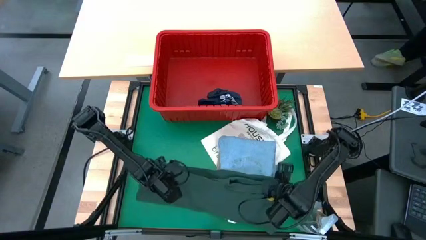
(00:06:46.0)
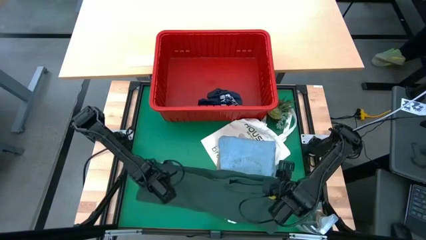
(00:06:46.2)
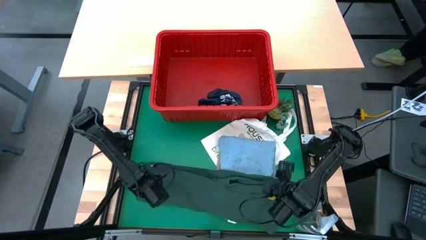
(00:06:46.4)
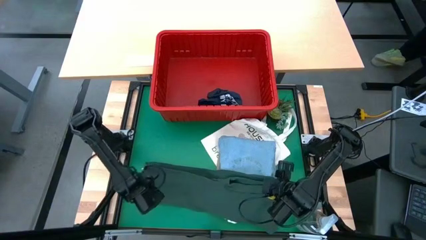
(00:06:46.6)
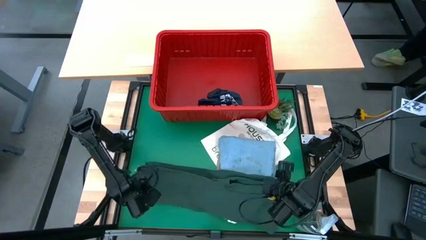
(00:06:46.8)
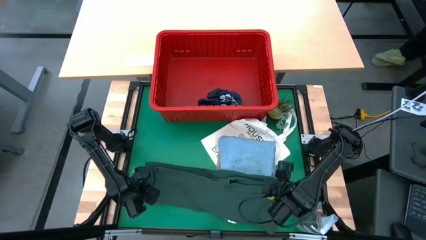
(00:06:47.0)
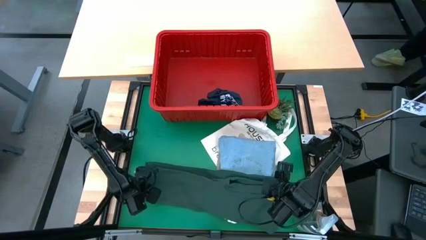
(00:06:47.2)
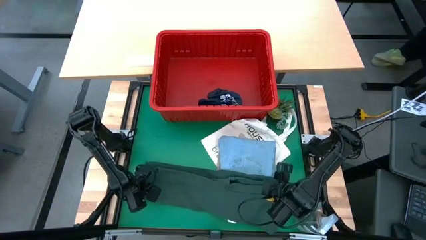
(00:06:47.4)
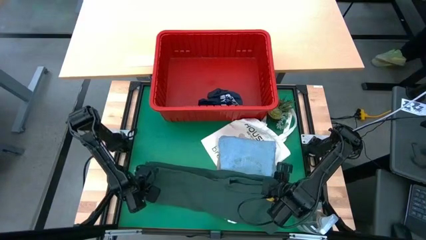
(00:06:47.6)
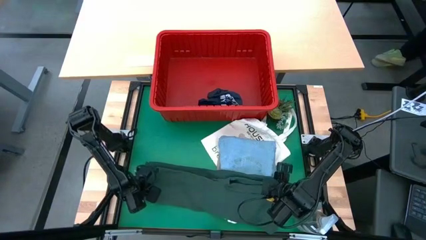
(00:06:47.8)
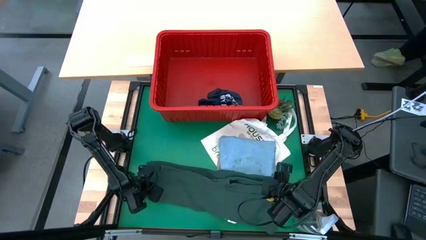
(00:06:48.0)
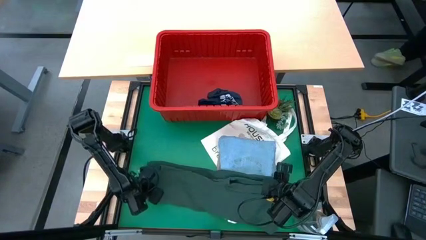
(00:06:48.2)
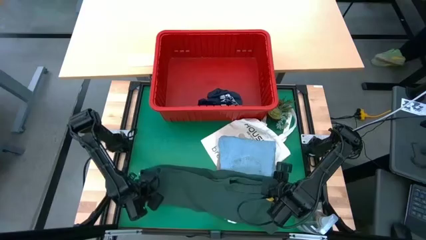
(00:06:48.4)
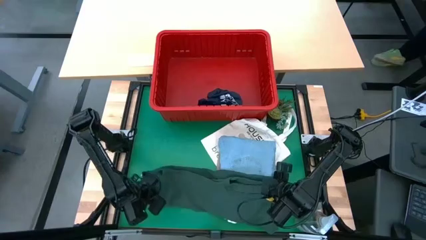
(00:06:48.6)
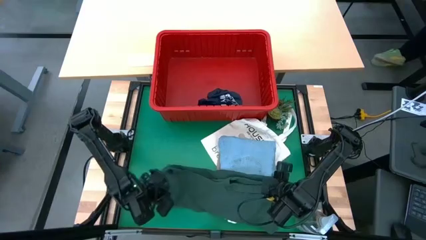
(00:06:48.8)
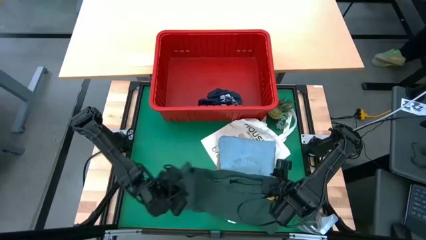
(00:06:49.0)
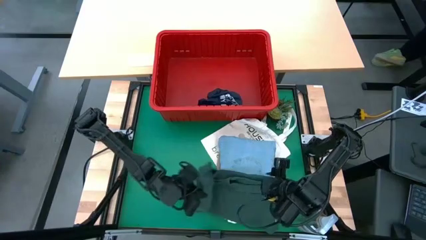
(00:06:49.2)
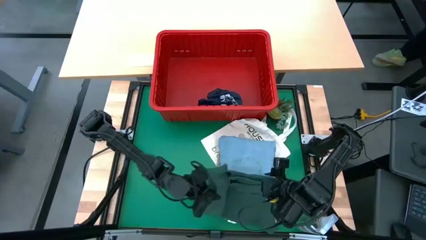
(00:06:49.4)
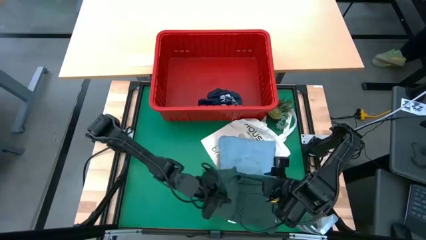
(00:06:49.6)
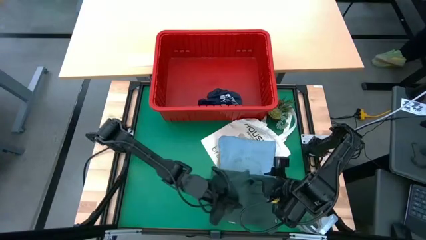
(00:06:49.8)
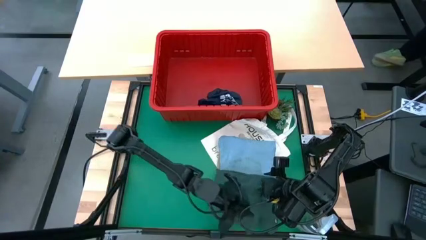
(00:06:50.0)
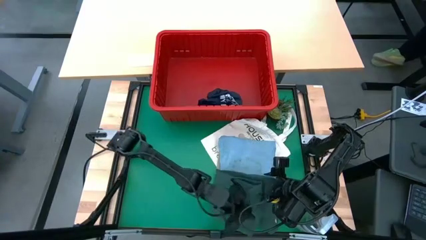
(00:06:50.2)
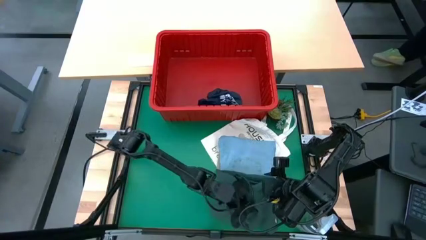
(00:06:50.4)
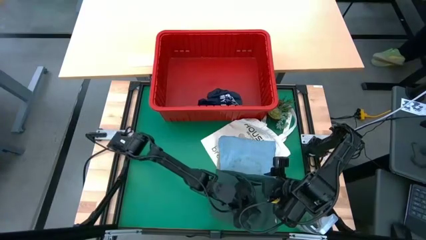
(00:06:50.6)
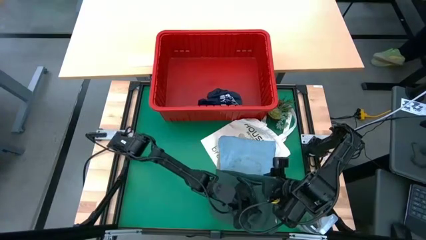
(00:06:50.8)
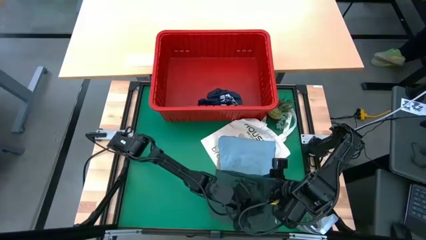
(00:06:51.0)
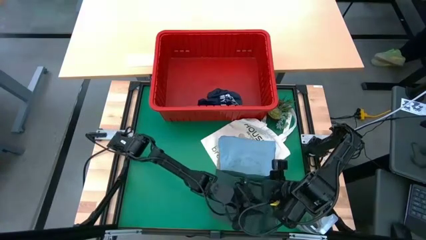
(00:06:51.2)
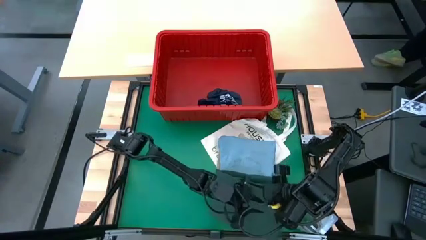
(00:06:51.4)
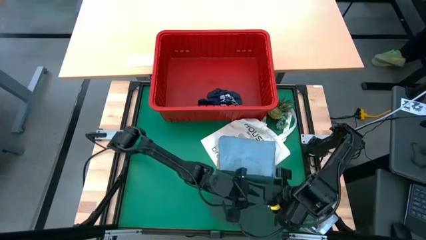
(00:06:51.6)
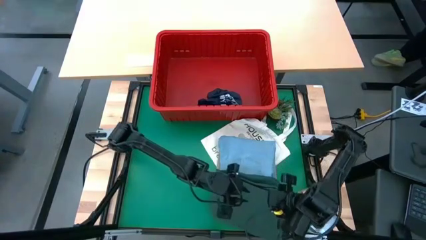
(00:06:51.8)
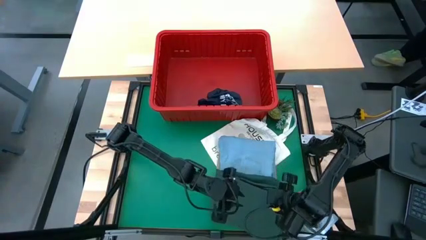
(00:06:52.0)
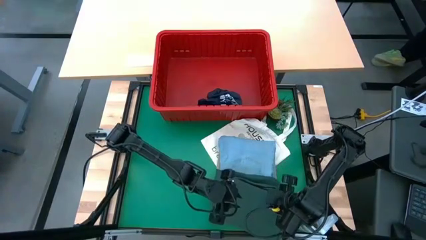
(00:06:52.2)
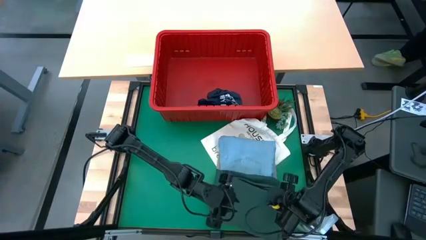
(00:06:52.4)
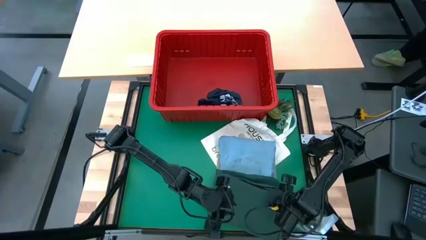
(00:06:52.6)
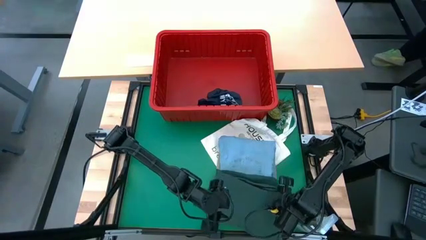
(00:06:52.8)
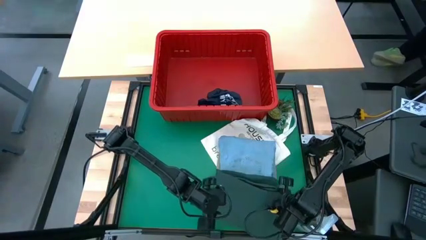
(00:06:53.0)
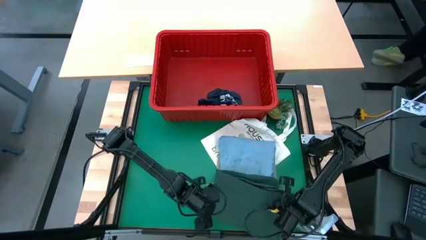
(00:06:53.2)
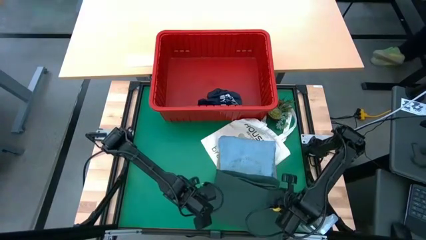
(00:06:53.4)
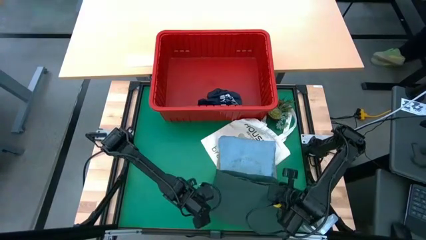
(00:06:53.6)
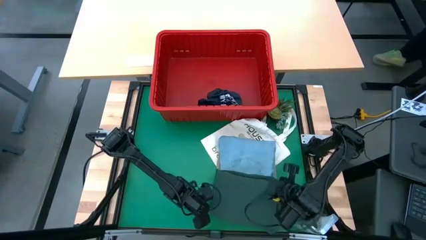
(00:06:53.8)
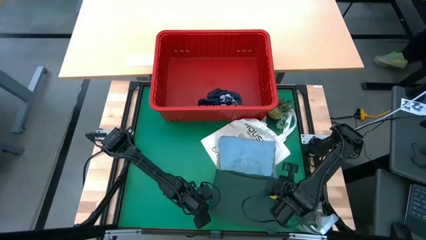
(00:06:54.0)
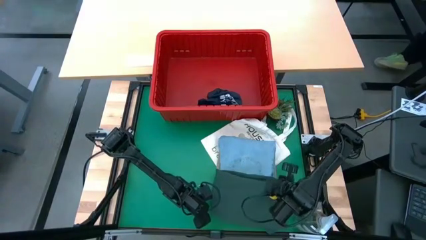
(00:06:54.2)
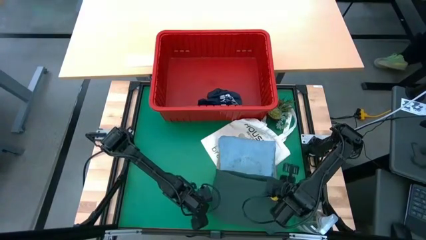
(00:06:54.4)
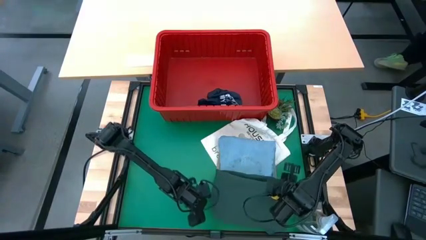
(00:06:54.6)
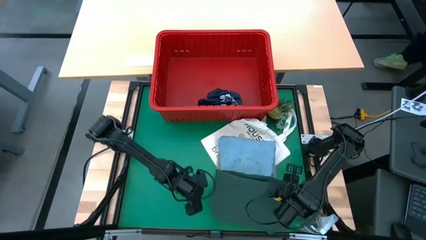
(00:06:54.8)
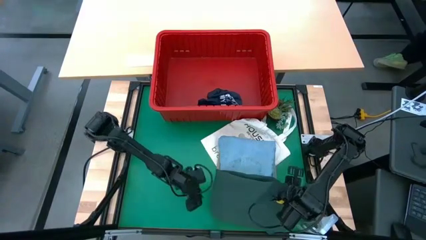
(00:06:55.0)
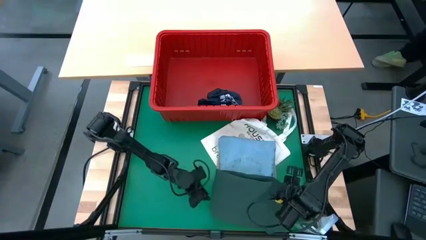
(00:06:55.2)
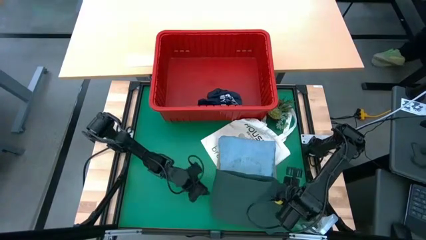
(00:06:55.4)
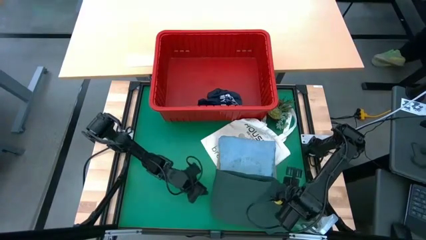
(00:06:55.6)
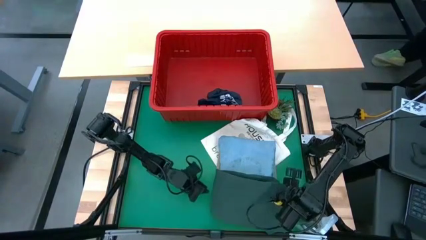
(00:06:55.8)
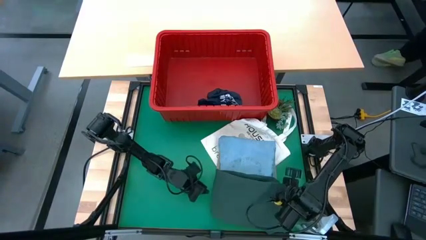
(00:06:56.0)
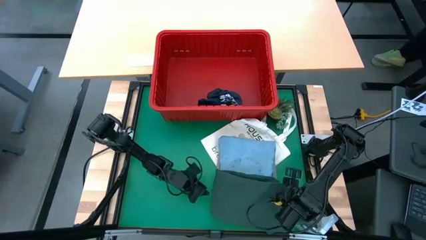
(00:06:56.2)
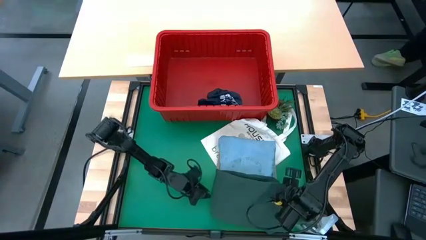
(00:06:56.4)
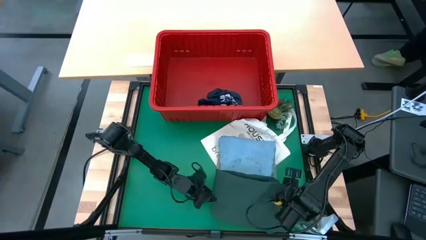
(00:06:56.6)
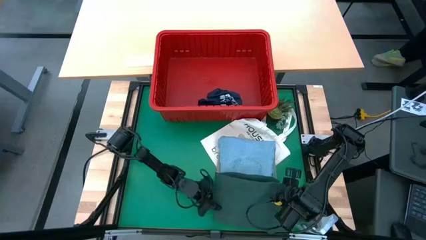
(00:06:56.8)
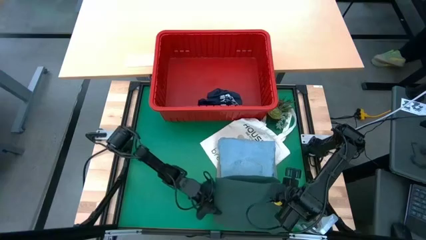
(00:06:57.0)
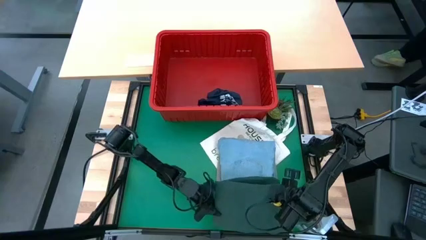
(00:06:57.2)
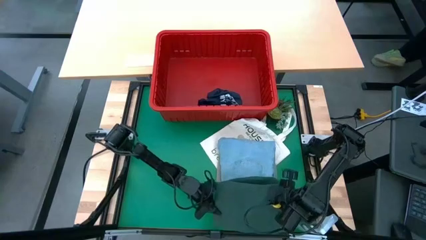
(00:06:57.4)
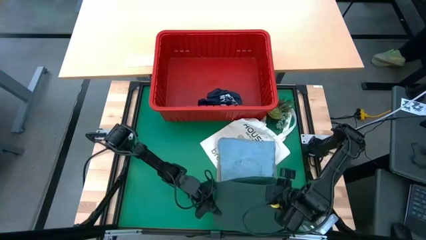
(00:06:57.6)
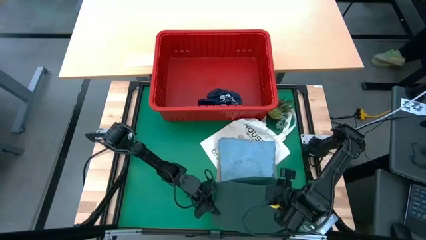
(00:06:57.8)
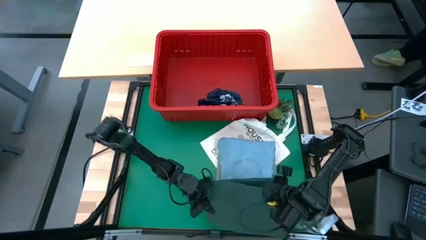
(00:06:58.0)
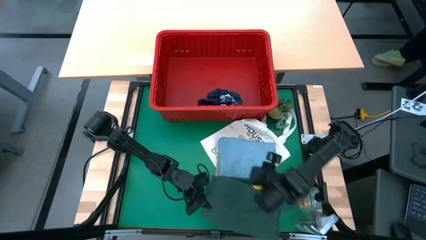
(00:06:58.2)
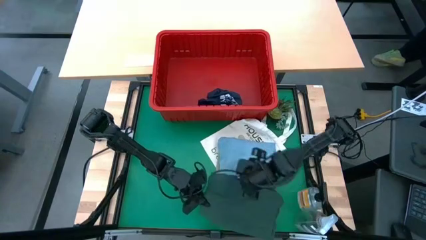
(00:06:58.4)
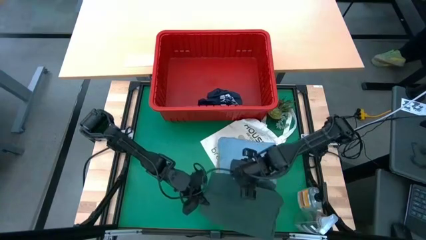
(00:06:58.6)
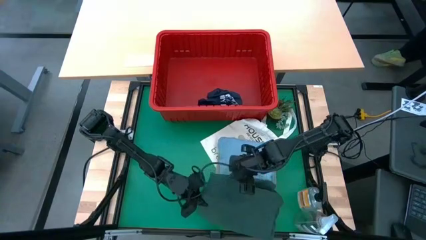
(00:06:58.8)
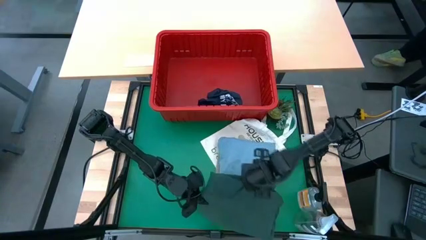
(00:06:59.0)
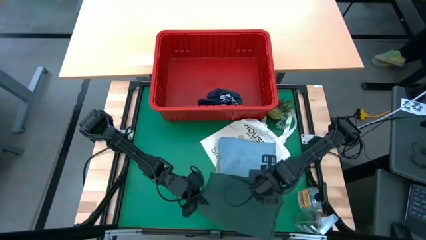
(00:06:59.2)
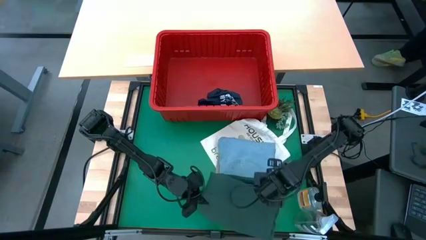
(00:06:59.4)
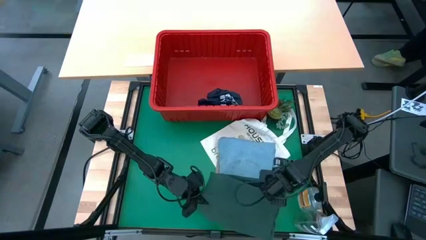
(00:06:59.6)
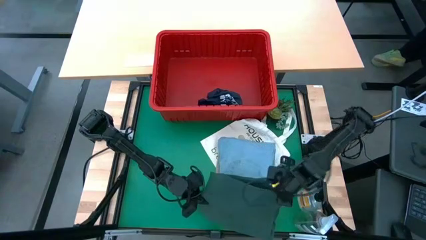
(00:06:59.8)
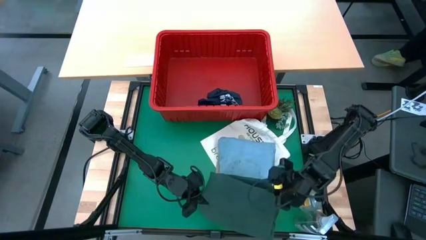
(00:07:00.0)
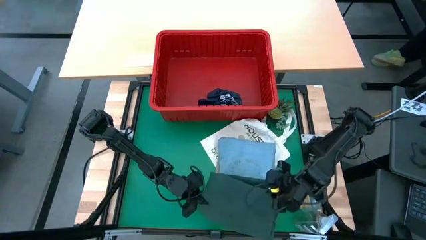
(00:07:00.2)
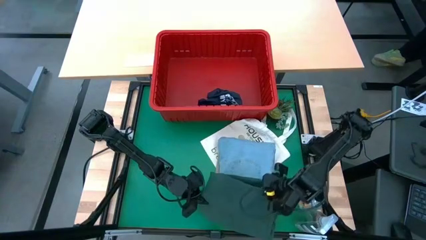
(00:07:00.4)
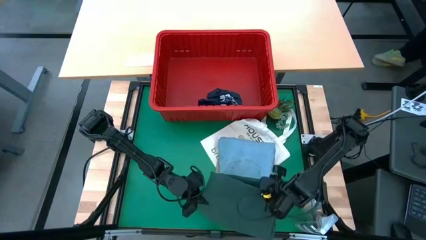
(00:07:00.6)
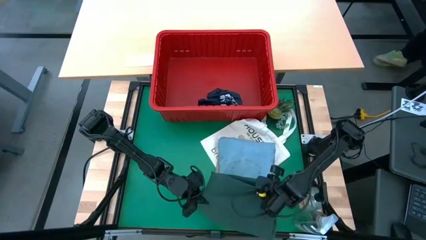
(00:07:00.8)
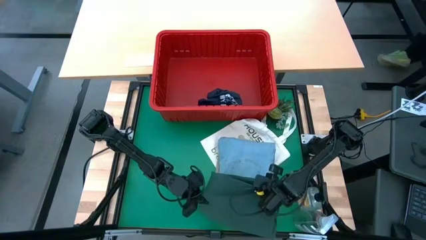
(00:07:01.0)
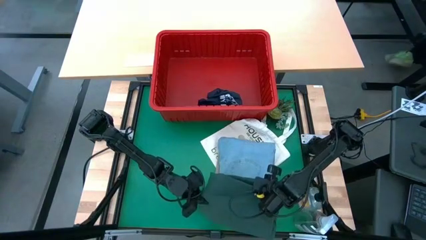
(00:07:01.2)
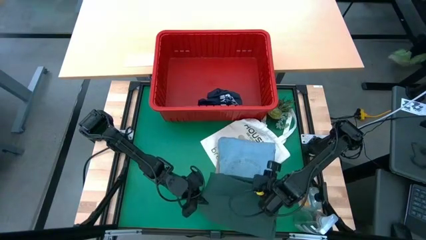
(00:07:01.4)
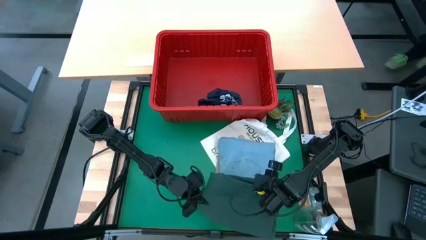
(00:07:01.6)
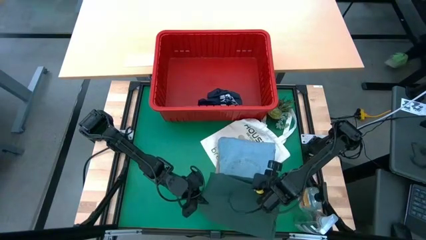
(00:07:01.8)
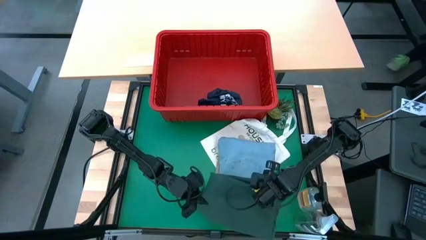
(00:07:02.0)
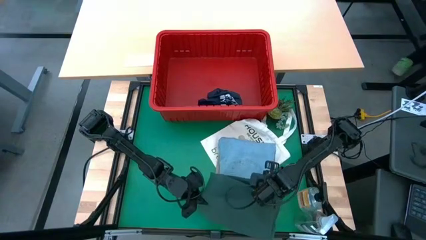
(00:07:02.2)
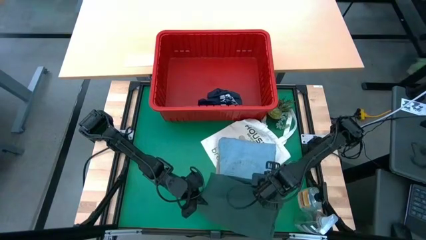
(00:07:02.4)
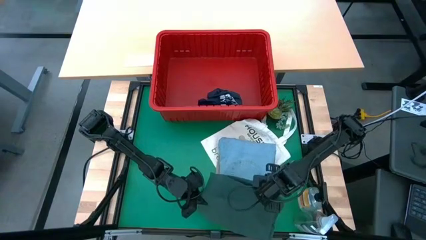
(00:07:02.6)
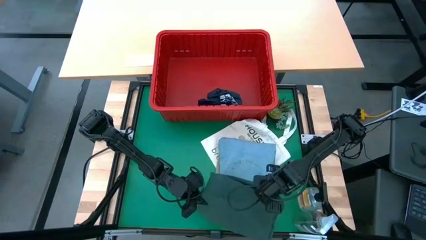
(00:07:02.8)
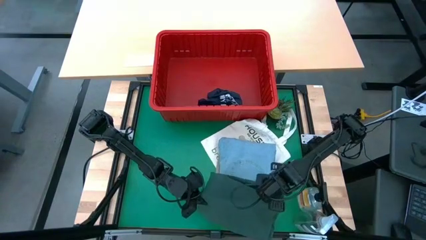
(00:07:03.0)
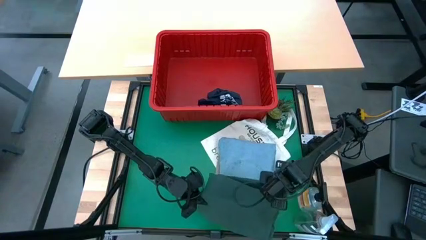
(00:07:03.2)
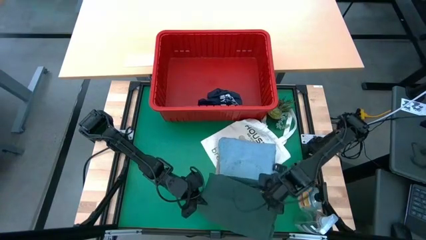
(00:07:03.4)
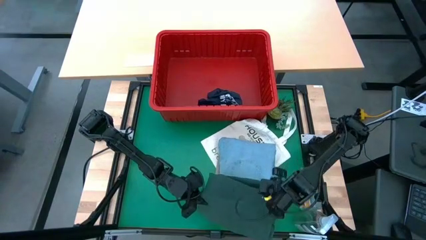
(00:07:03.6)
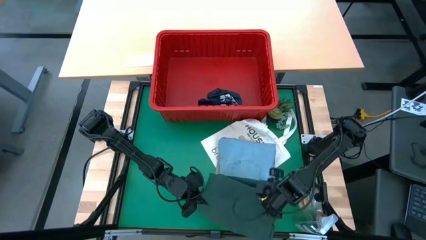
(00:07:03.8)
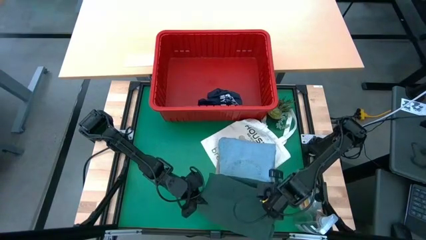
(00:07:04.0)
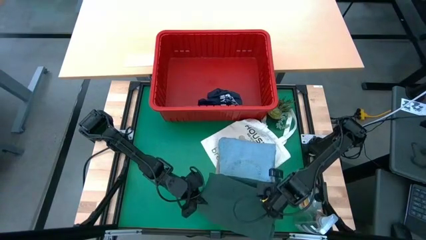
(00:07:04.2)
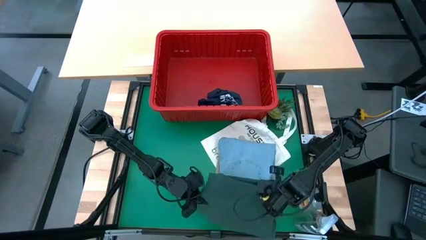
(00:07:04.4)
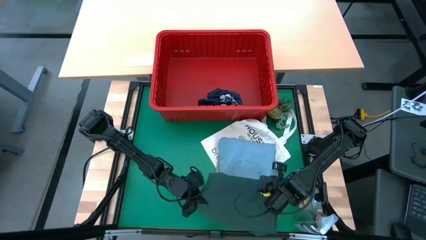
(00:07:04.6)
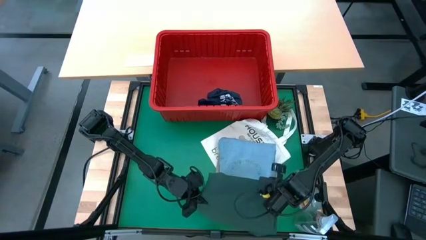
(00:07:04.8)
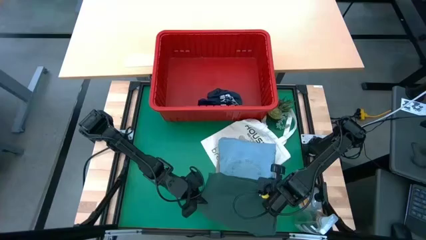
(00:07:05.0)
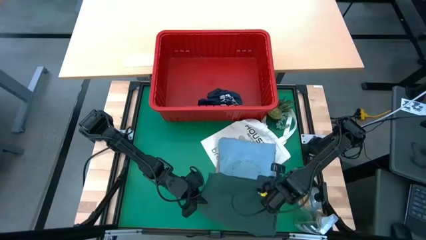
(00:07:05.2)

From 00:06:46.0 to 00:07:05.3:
Task: Fold Laundry from Bin
Fold the green polo shirt
